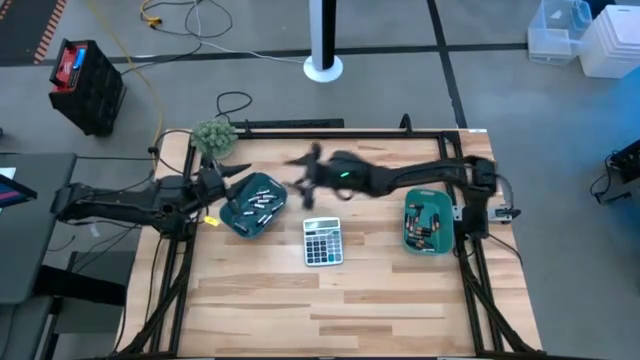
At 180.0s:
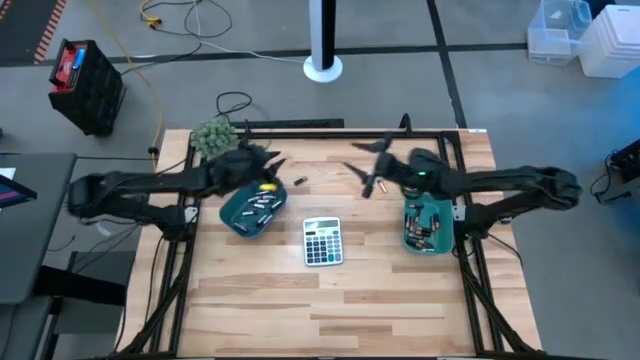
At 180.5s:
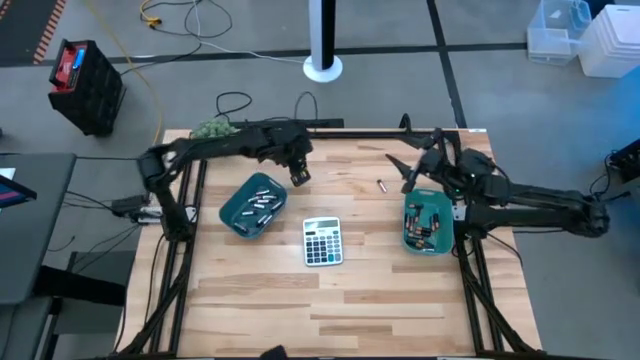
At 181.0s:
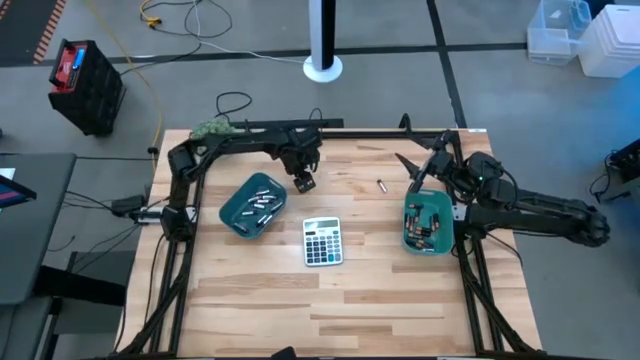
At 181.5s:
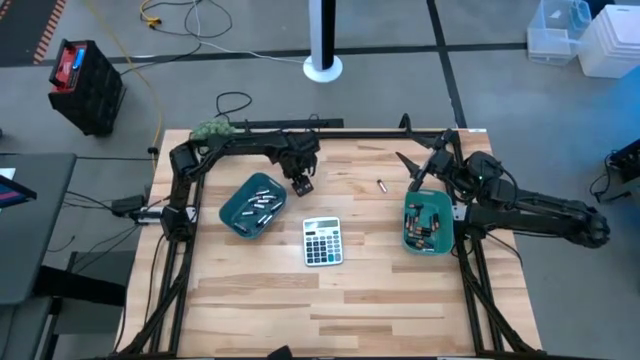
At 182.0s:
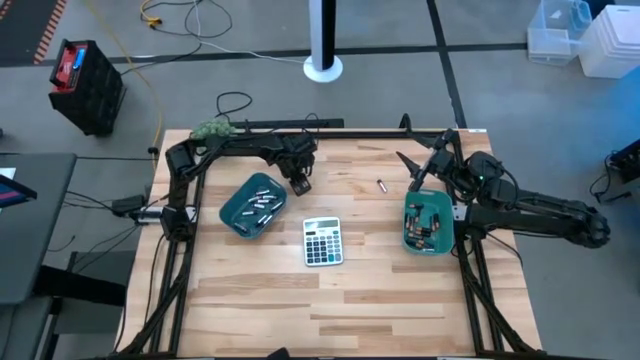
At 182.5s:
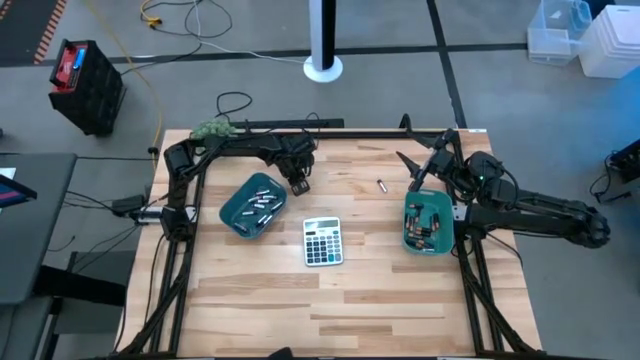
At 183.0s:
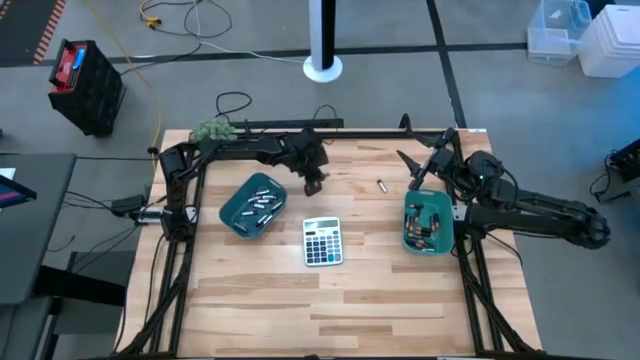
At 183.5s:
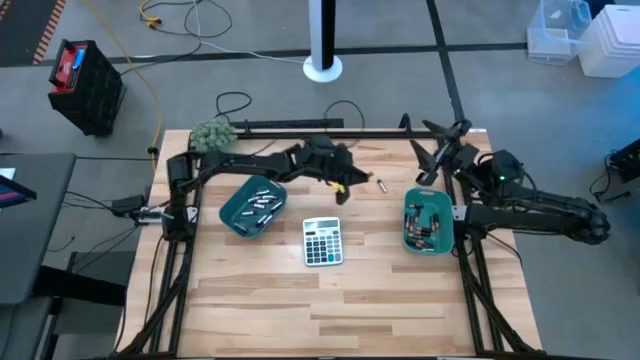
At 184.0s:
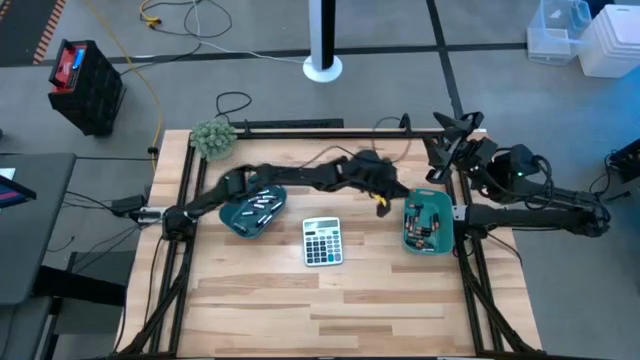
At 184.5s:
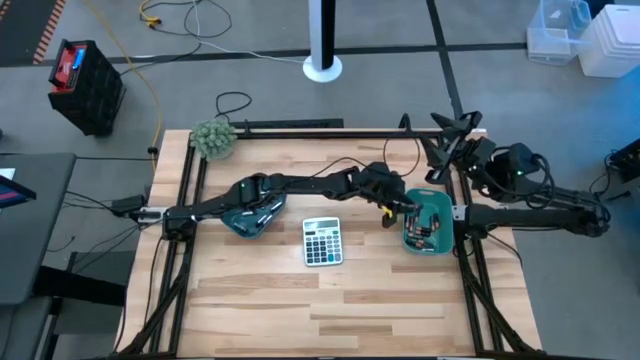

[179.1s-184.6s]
Task: Sort batteries
Put the brown/black battery into the green bin

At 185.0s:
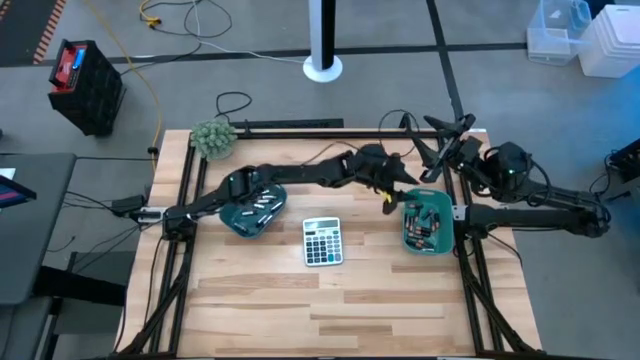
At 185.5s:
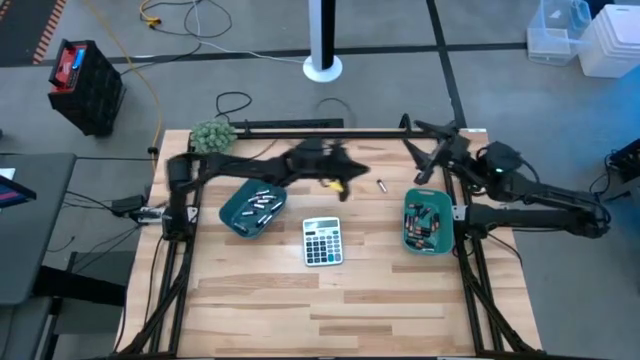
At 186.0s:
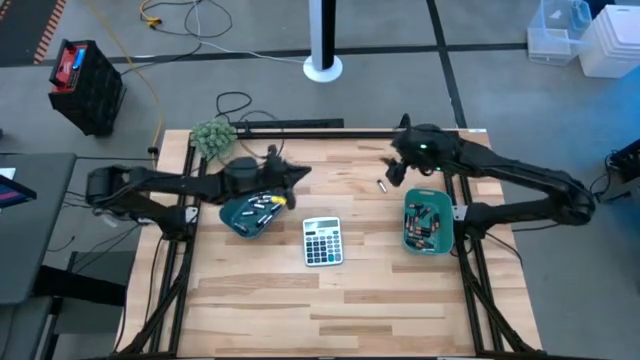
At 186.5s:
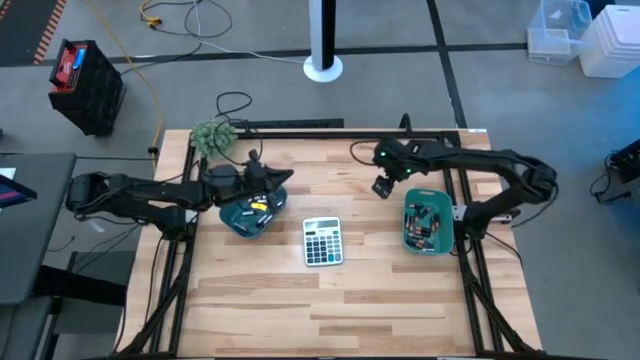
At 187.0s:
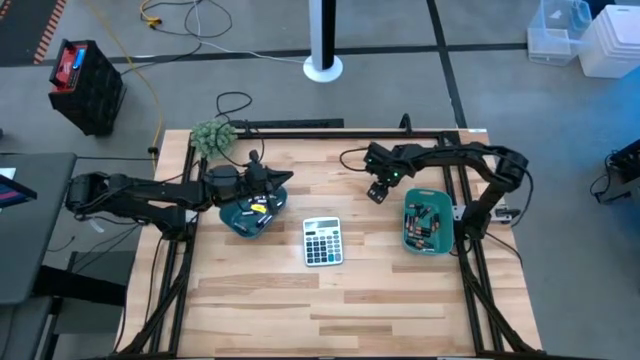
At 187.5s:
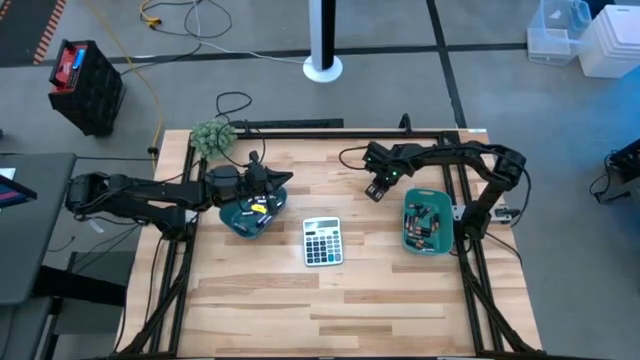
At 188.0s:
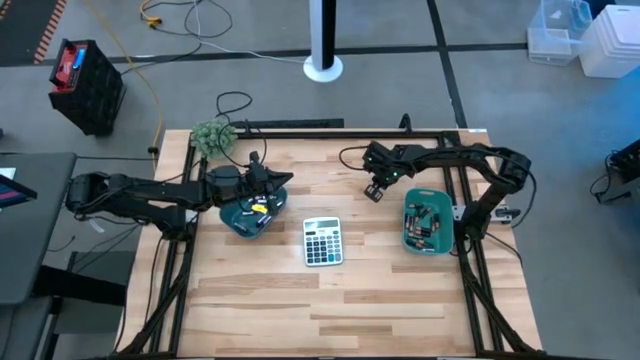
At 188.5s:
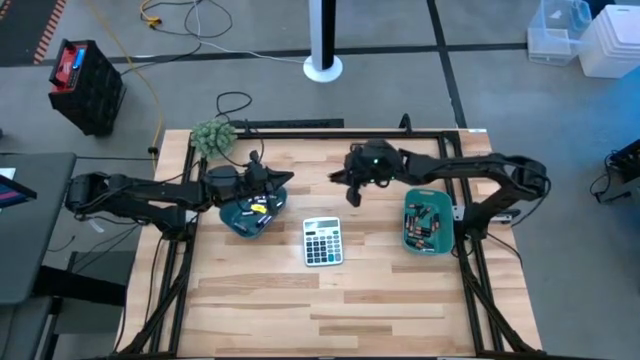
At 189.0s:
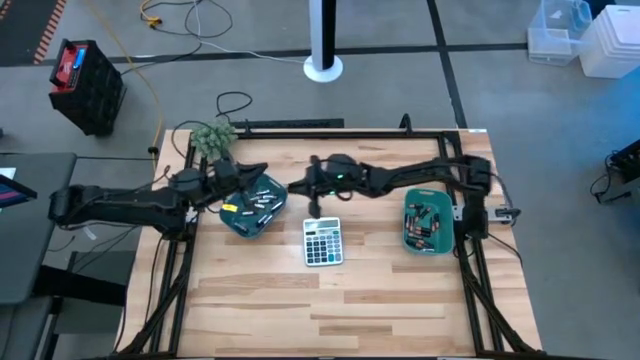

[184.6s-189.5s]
Put the silver/black battery into the blue bin

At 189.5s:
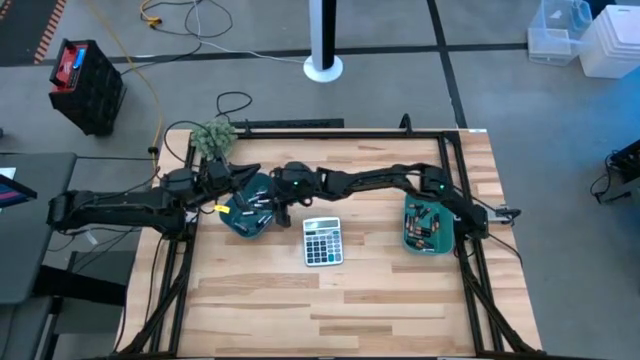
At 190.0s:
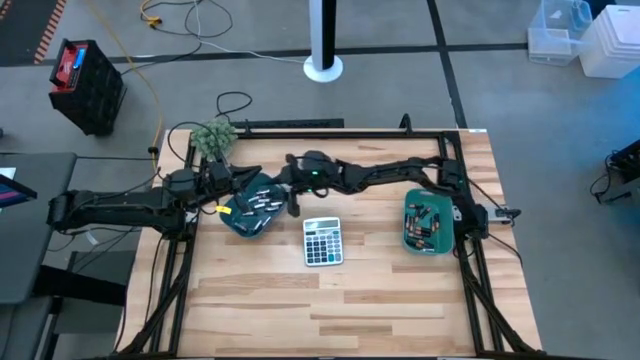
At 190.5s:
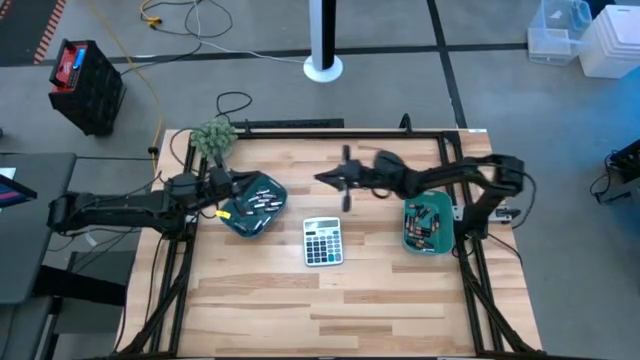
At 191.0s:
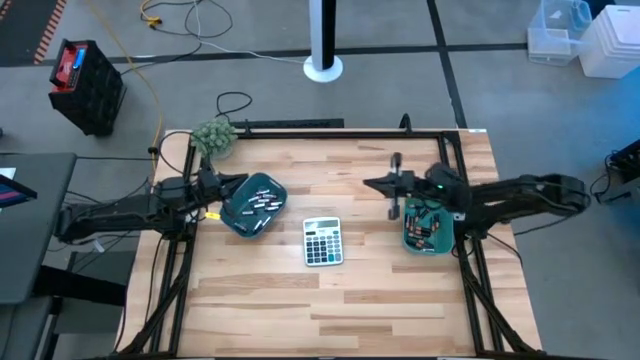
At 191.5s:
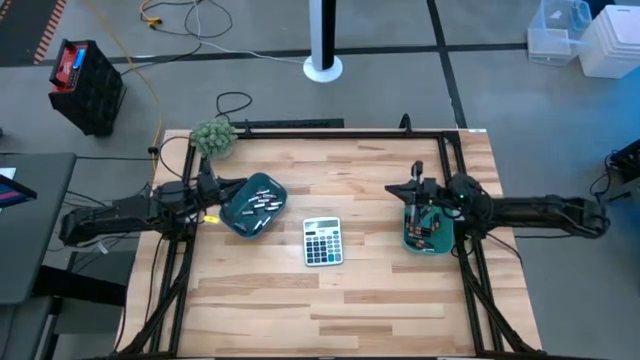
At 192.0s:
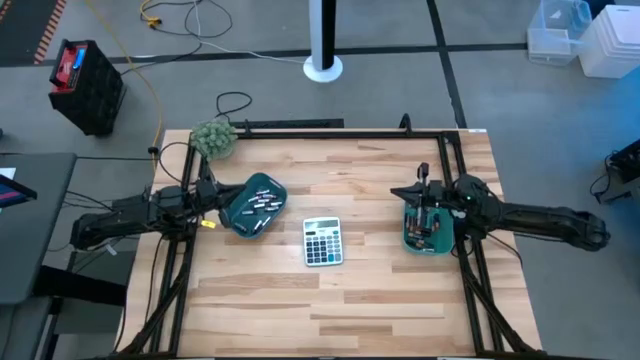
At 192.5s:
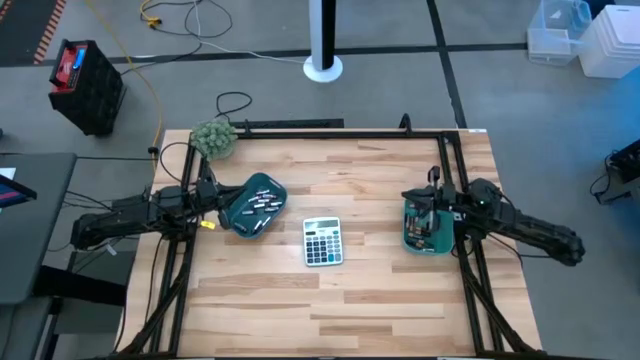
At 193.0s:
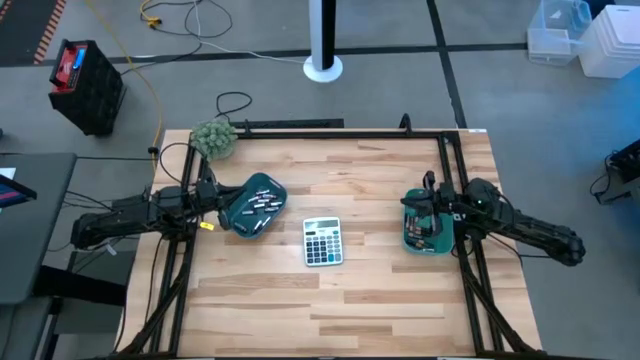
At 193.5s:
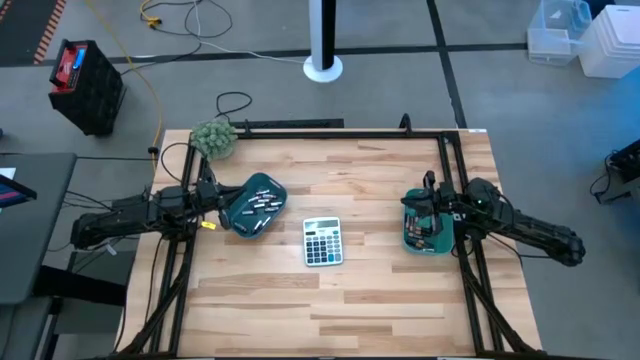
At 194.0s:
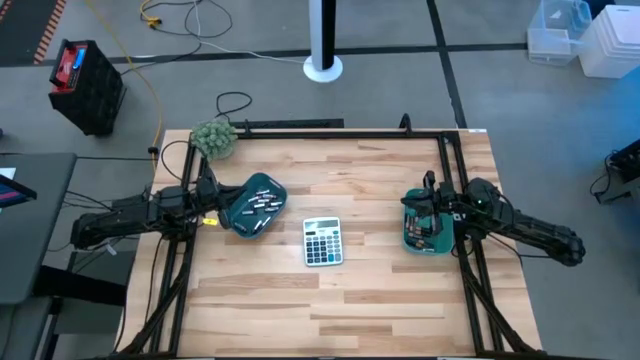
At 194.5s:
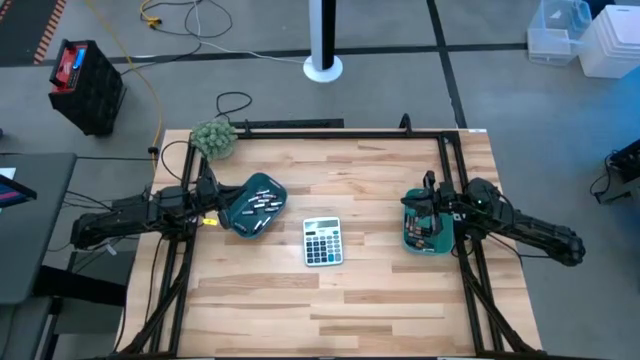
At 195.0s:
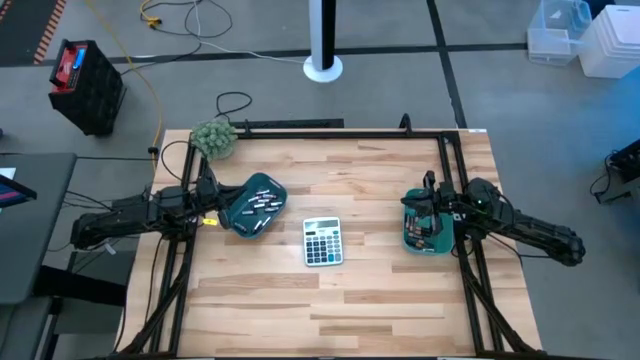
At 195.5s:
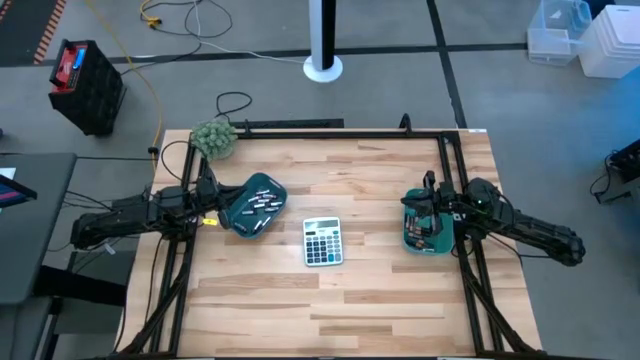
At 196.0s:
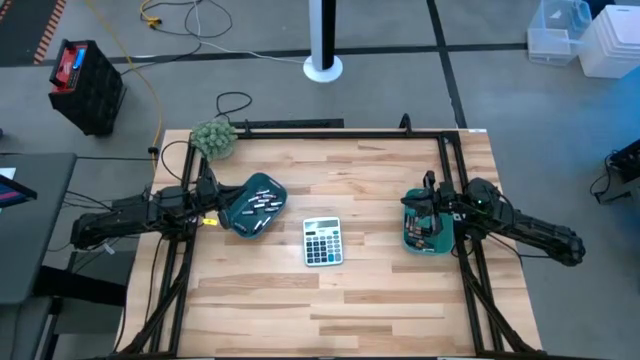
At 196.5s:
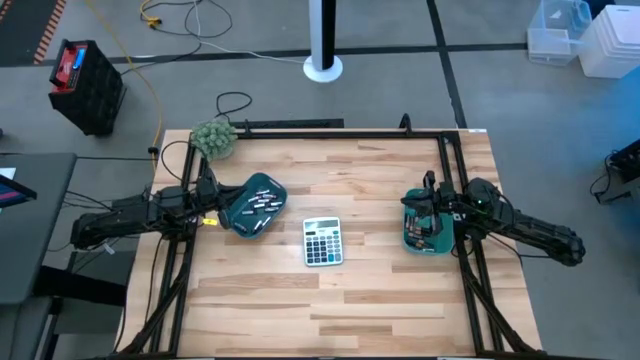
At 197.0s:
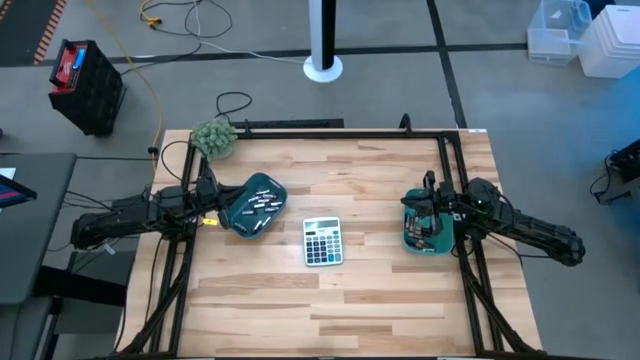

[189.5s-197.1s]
Return to Home Position

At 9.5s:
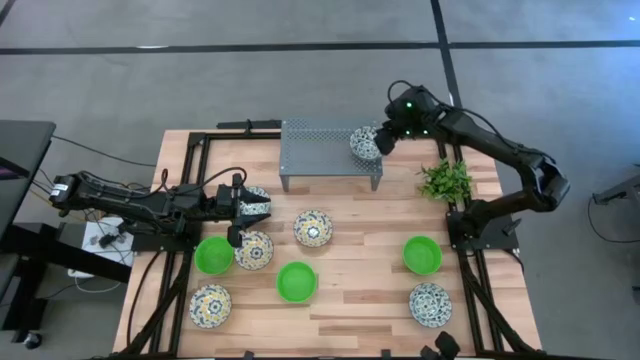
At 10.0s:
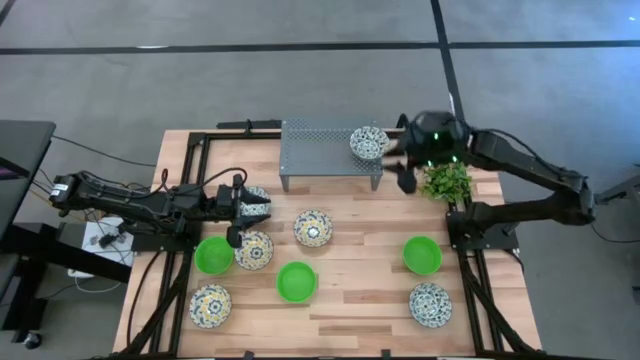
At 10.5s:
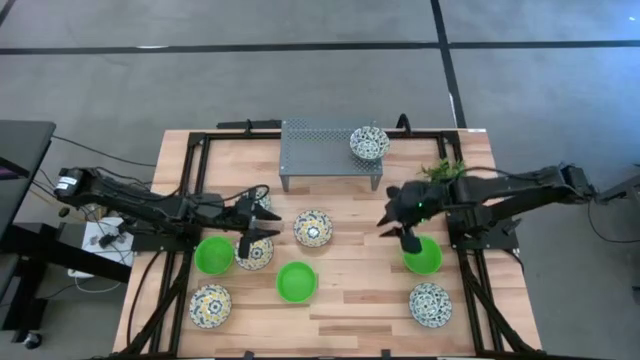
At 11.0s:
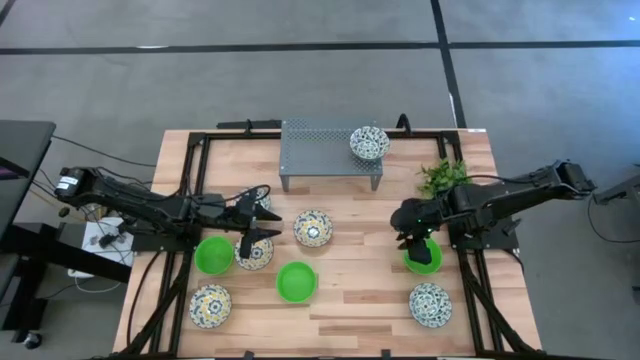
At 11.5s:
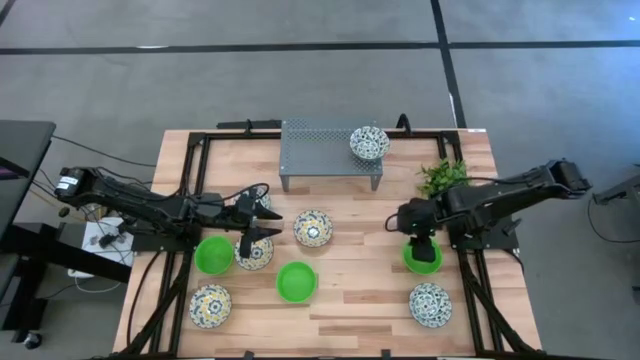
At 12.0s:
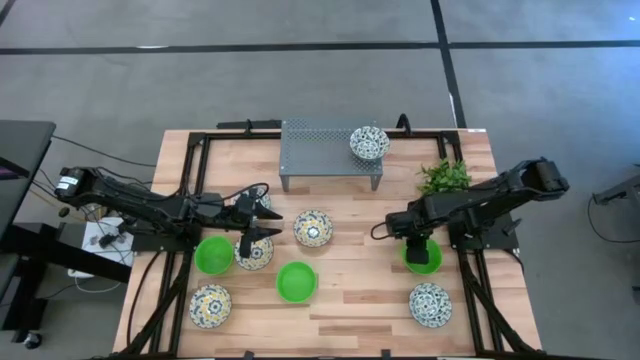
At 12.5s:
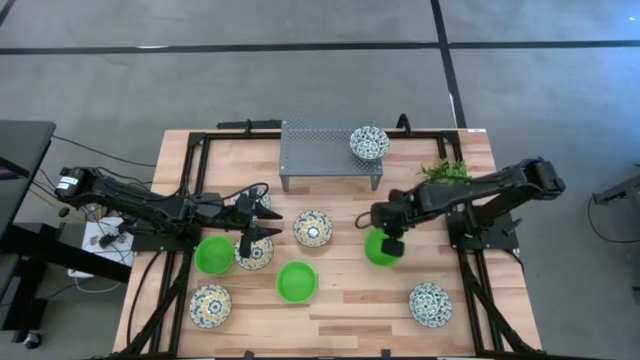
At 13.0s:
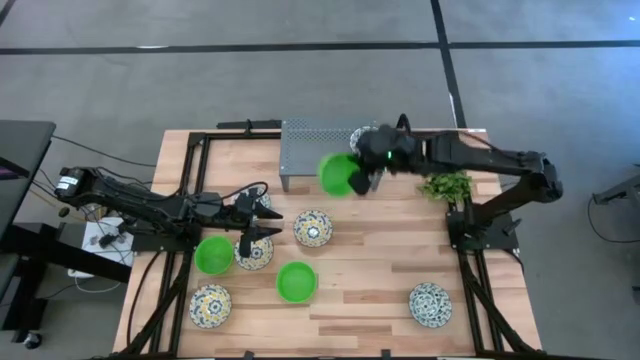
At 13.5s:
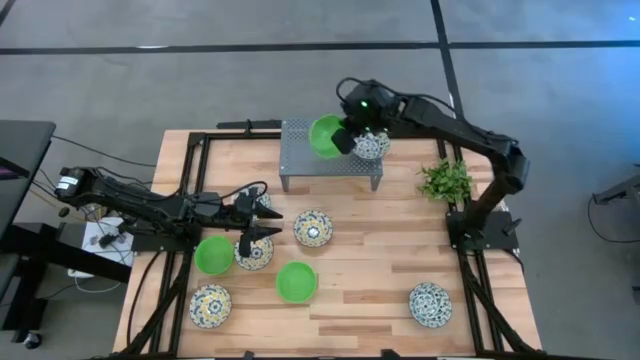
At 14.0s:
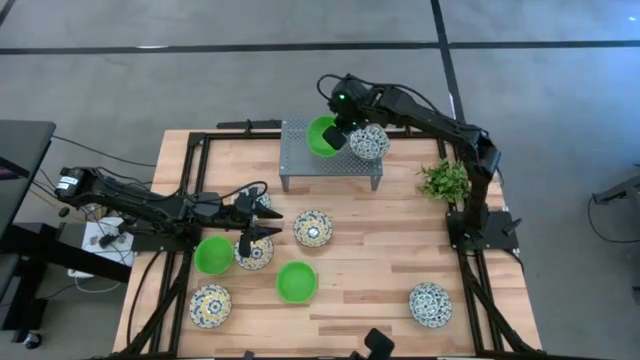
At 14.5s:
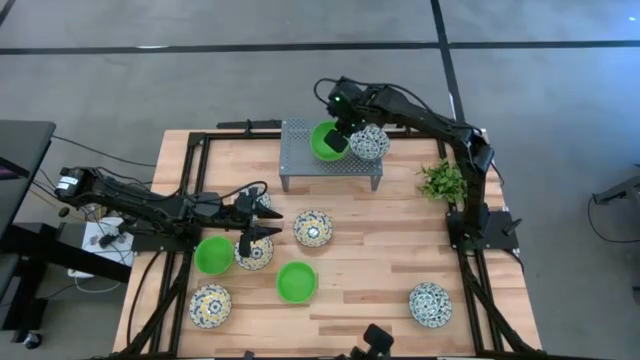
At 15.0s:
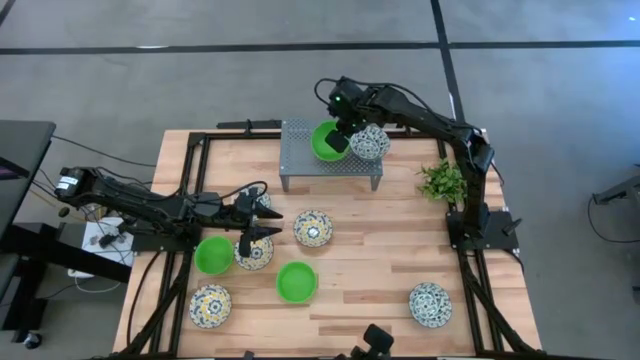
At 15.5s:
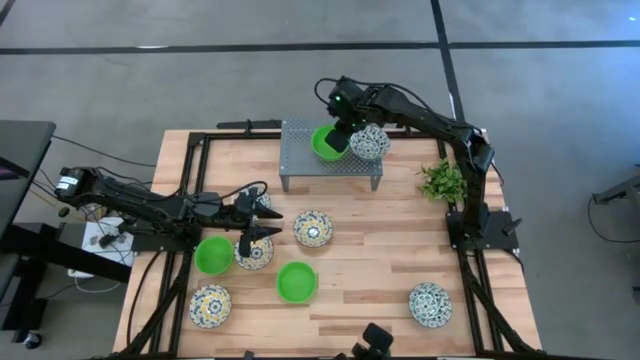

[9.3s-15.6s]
Task: Pick & Place Mini bowls
Put the right green bowl on the shelf
